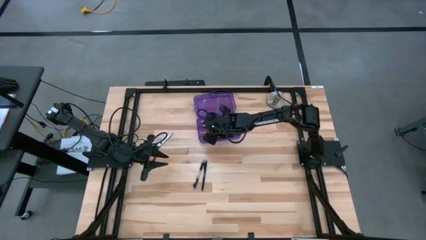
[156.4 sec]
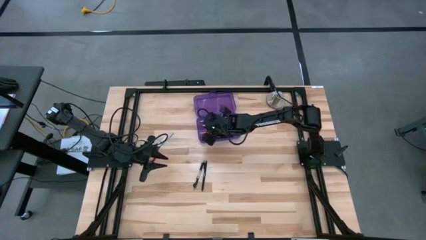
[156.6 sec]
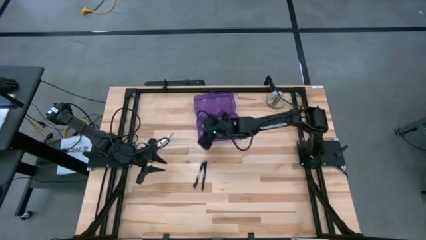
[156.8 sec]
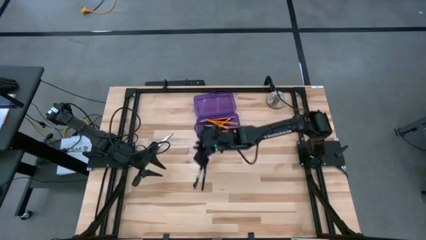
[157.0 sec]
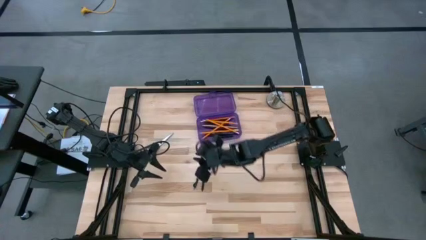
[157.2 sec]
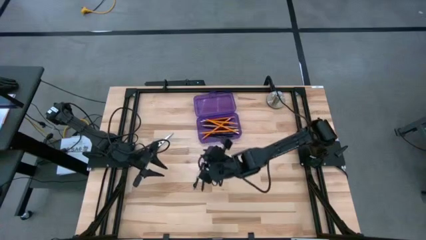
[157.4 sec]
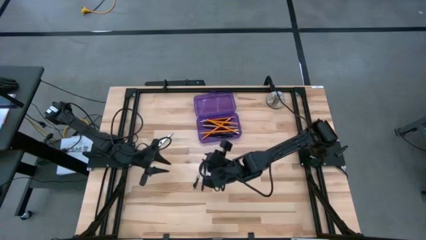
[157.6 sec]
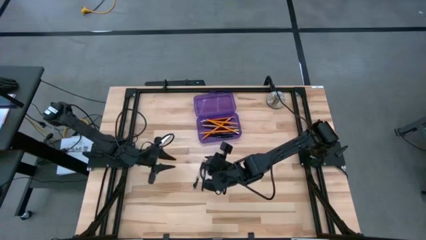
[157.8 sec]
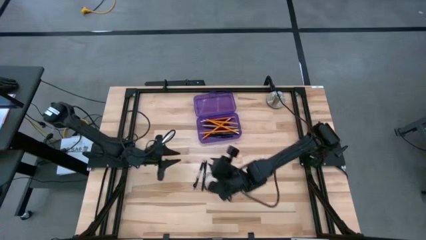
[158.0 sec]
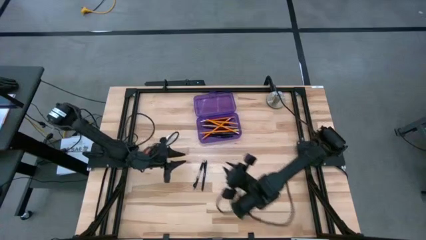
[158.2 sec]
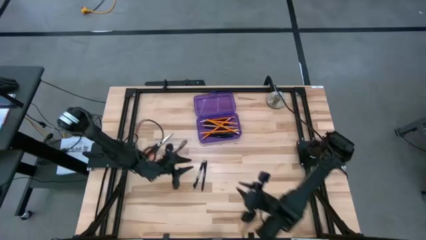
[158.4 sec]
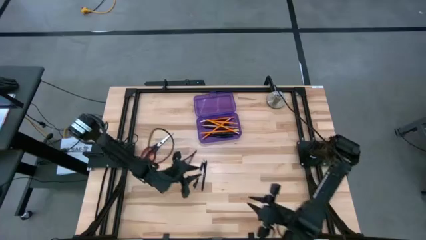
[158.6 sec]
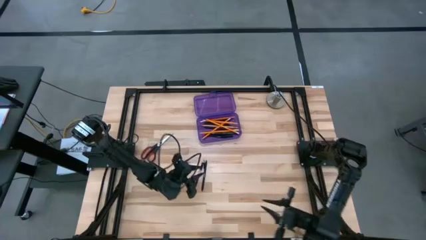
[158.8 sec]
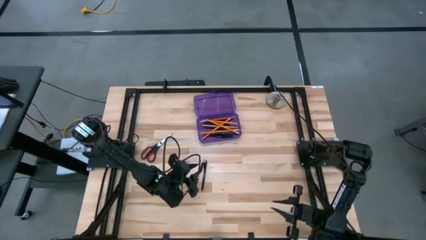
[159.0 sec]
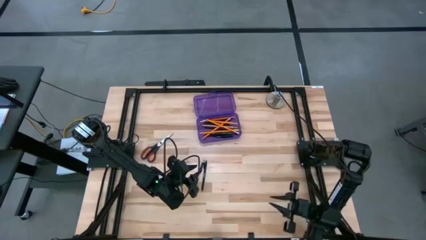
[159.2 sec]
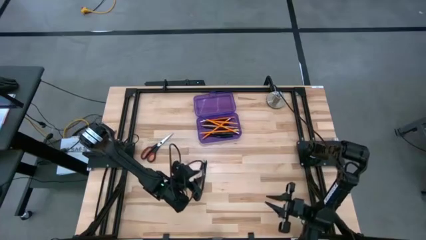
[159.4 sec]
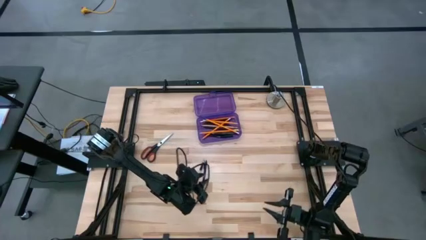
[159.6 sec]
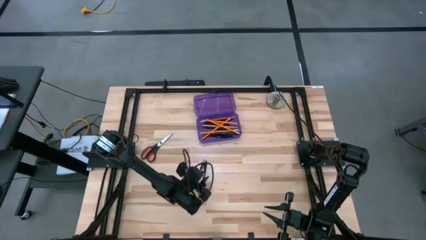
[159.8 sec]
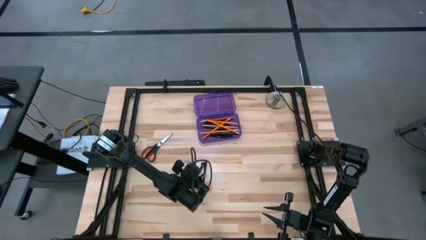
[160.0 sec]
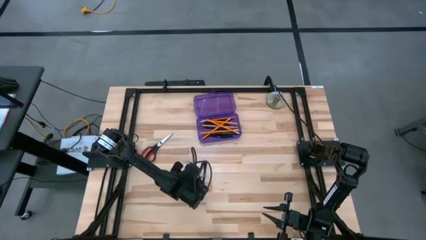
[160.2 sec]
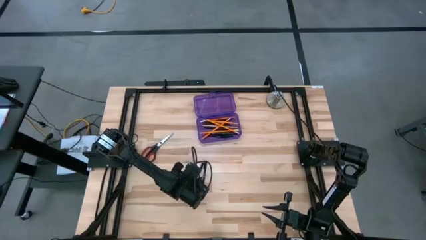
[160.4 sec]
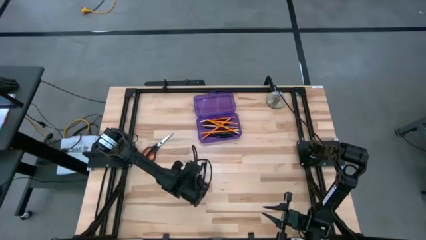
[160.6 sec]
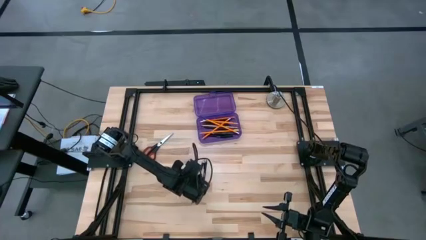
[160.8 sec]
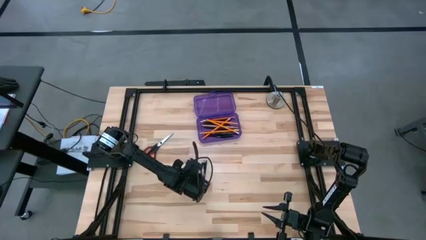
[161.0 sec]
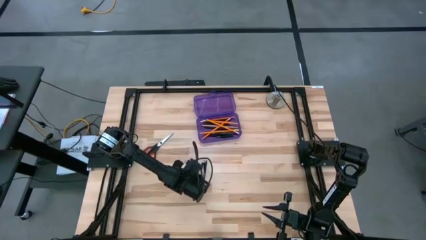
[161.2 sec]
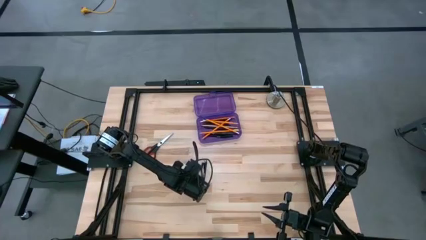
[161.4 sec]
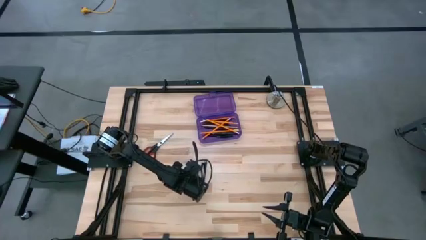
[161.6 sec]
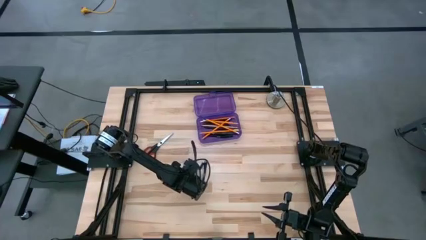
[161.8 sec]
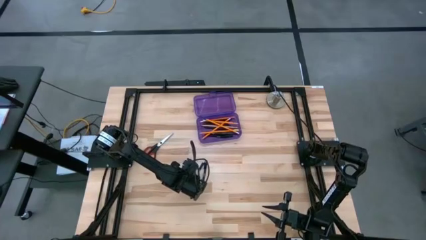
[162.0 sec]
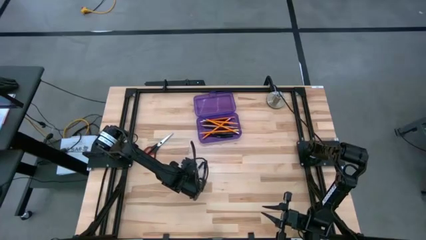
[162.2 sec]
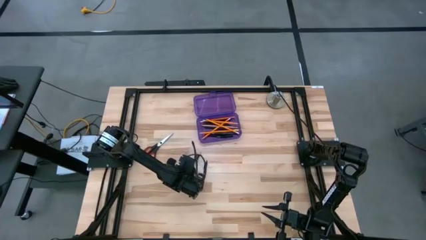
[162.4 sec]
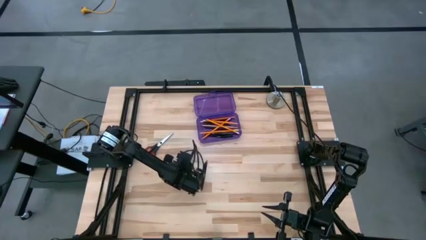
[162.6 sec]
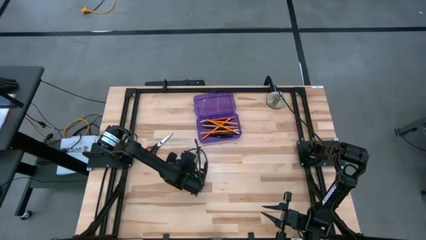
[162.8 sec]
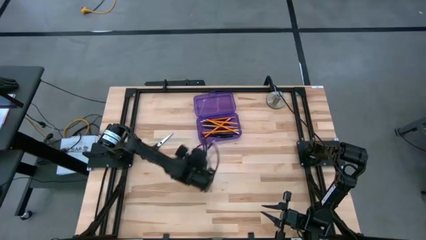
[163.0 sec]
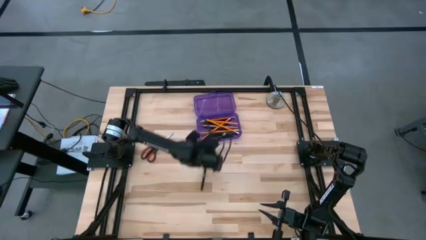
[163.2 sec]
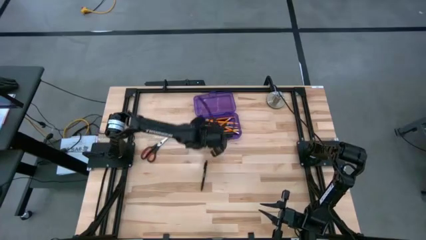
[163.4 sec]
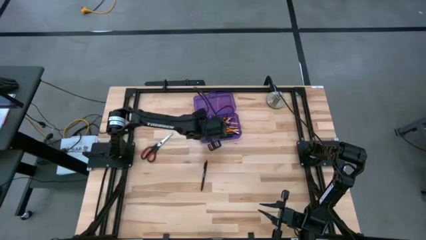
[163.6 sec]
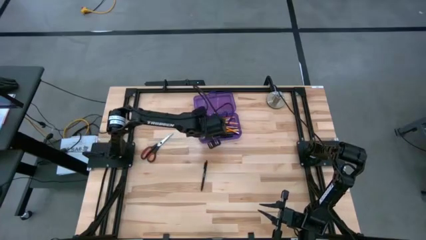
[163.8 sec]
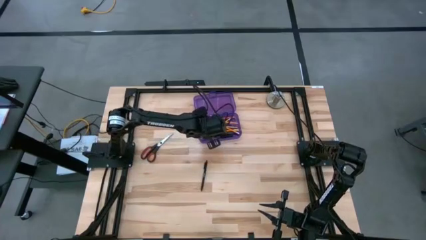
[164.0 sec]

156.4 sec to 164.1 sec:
Task: Pick & place school supplies into a supply box
Put the black pen into the the purple supply box

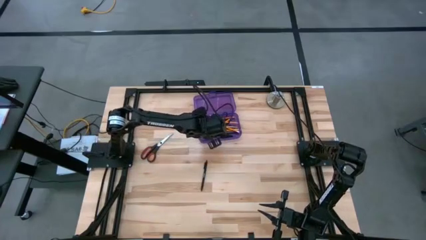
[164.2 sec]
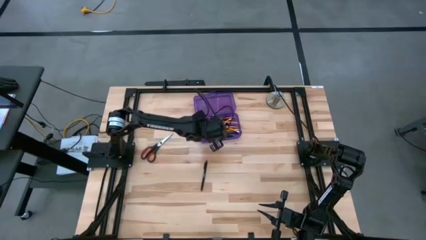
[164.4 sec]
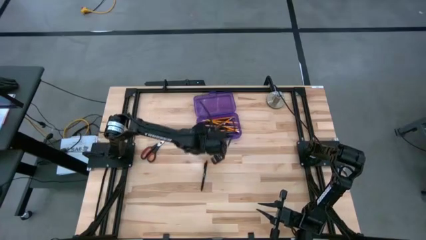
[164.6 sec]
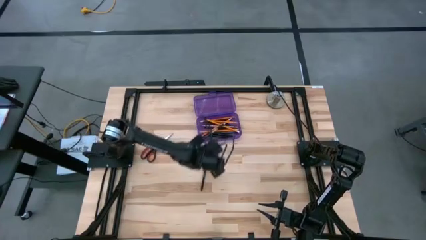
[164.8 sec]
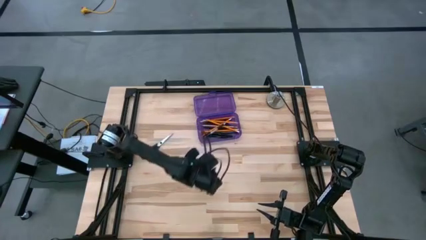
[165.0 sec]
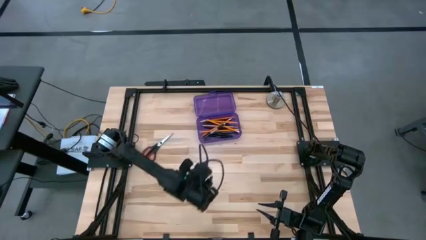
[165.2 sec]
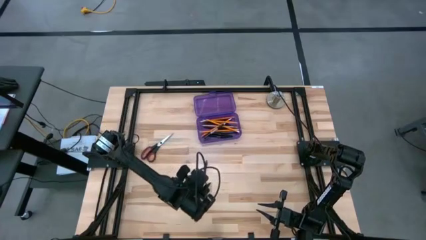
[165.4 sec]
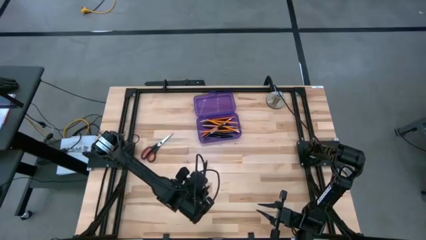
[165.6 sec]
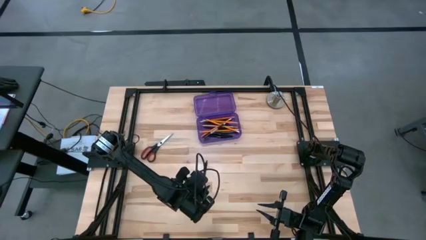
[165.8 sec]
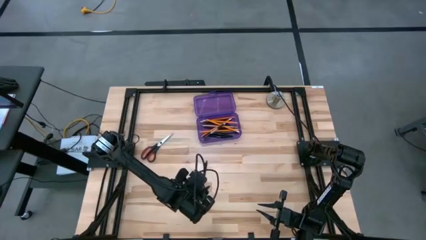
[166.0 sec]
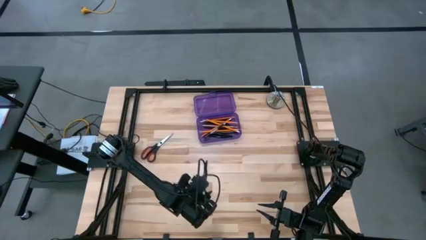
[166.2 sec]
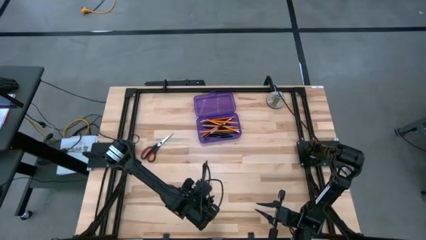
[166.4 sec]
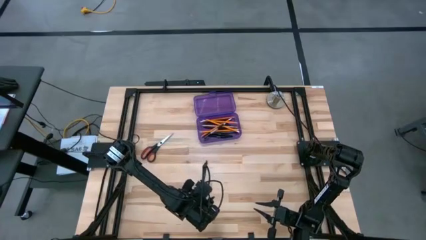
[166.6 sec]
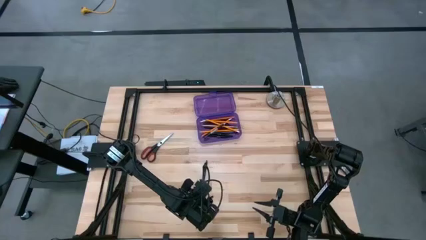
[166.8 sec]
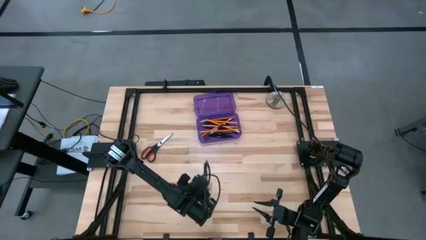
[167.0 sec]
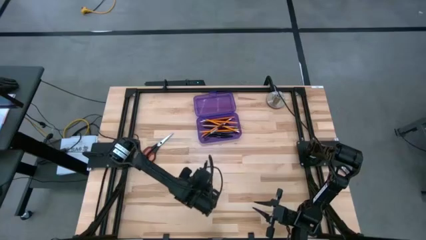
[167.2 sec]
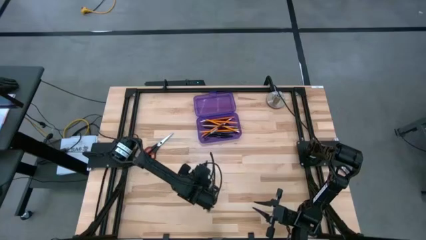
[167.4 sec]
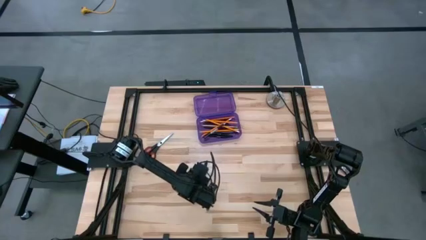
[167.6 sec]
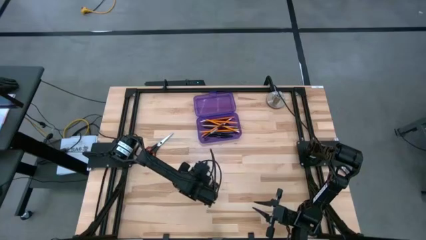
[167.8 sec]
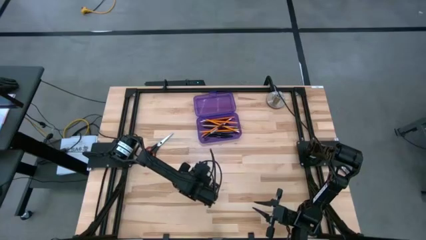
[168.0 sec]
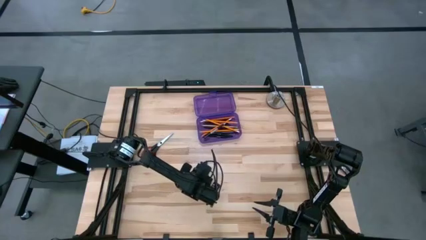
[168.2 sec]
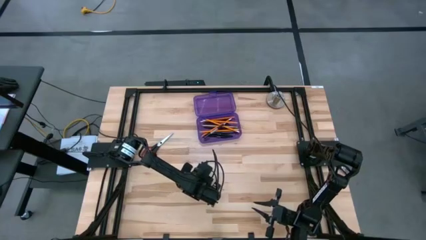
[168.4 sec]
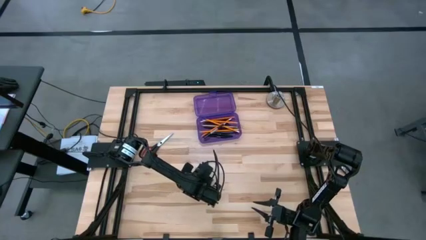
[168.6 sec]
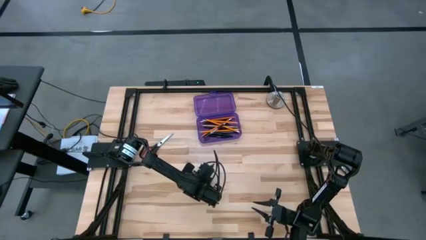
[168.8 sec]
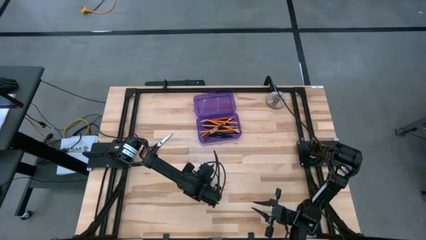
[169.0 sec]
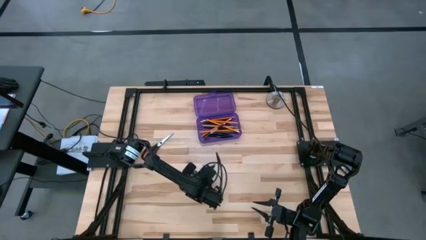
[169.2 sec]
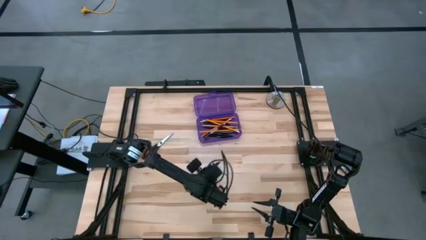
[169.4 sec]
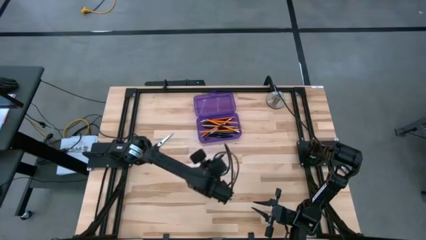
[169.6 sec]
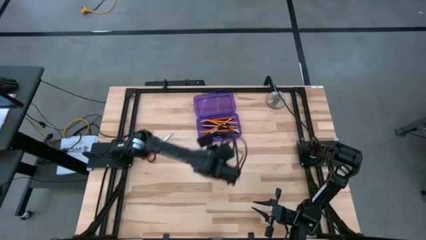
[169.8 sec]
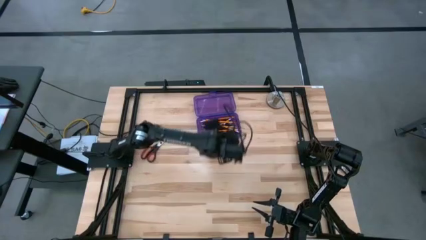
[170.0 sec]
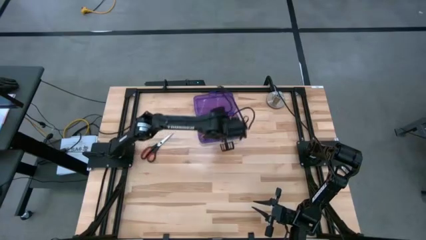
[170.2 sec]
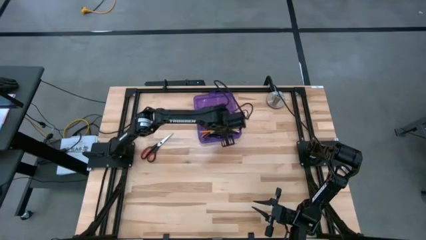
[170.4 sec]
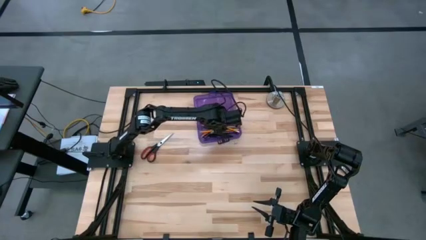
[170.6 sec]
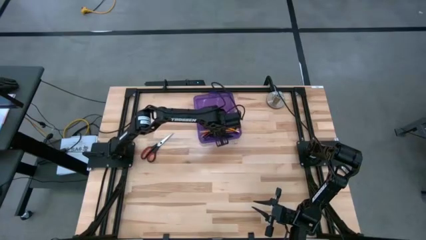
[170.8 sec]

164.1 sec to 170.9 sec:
Put the black pen into the the purple supply box
